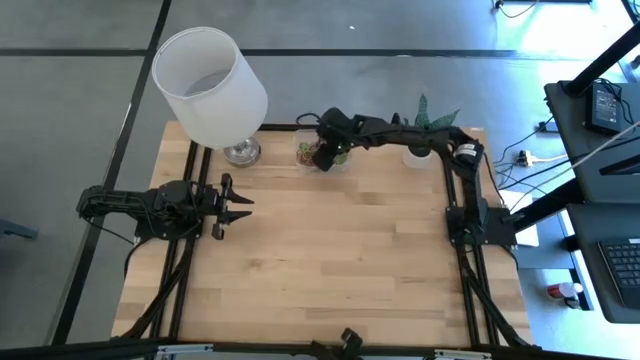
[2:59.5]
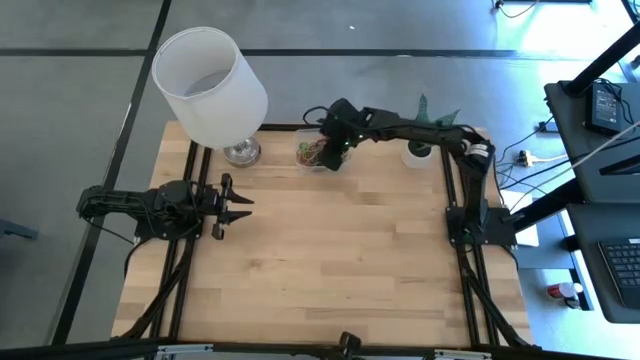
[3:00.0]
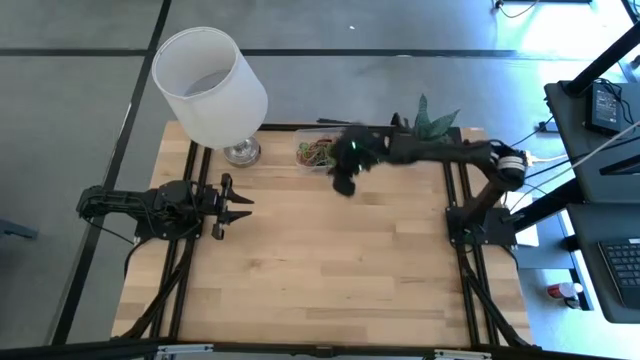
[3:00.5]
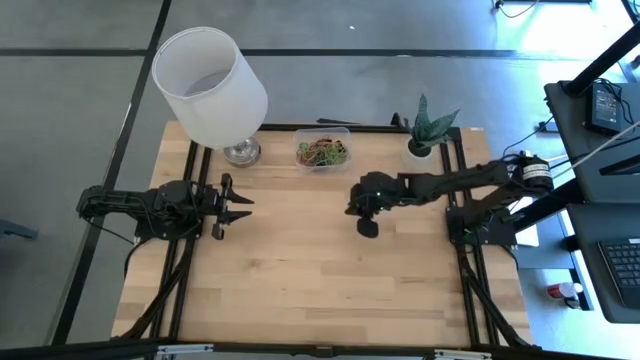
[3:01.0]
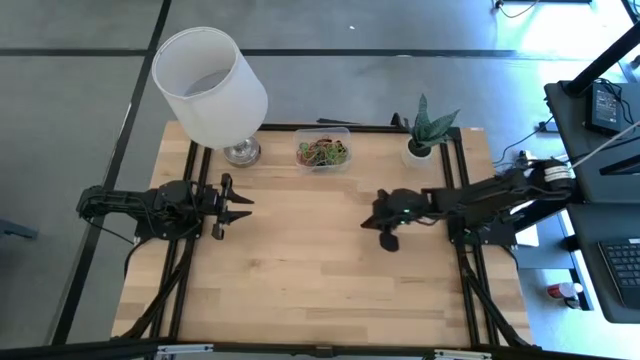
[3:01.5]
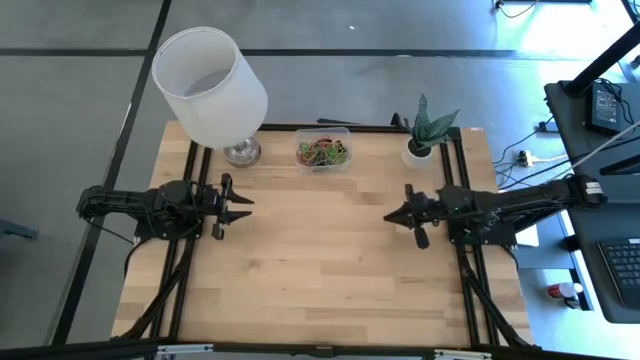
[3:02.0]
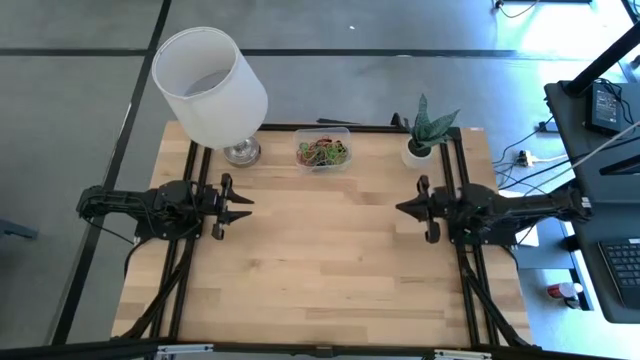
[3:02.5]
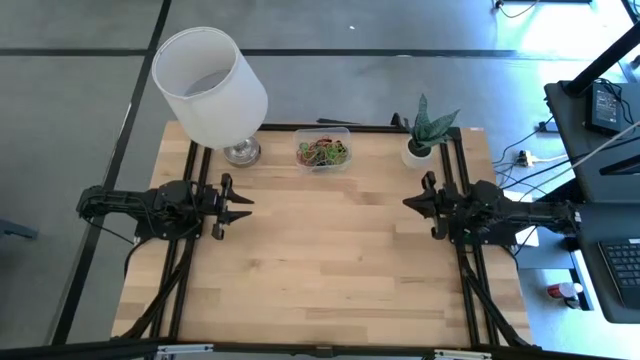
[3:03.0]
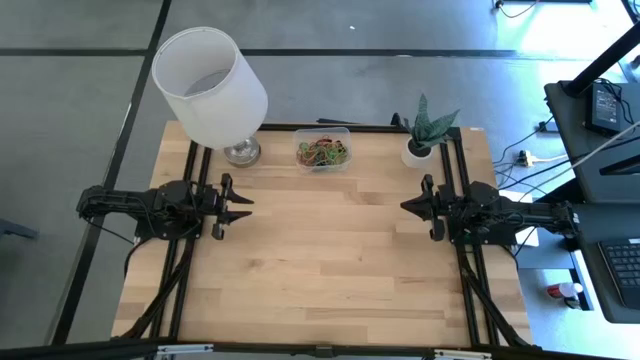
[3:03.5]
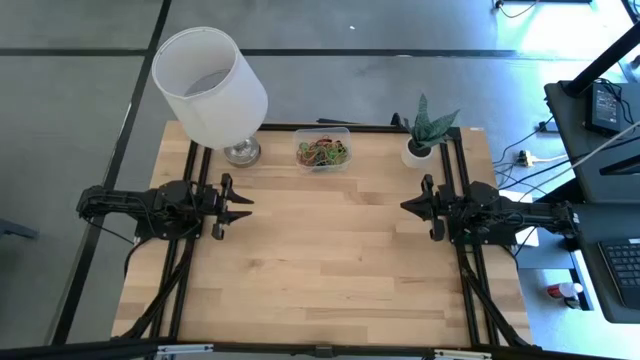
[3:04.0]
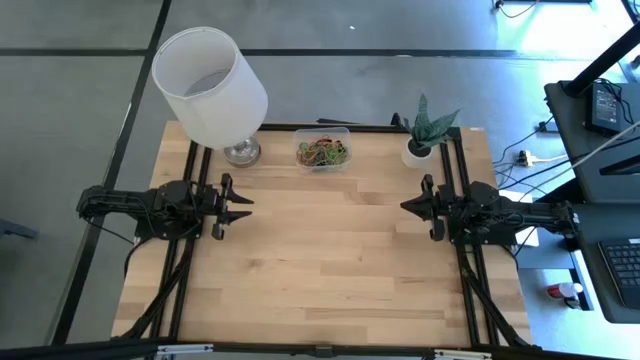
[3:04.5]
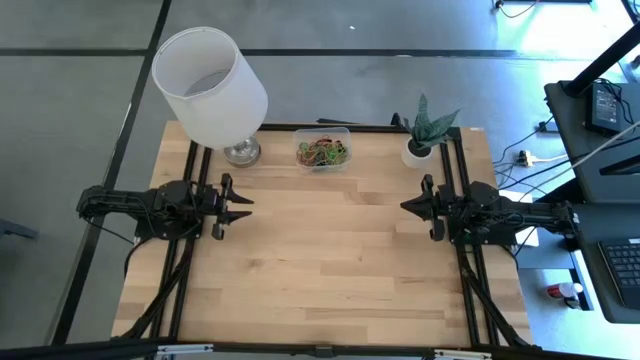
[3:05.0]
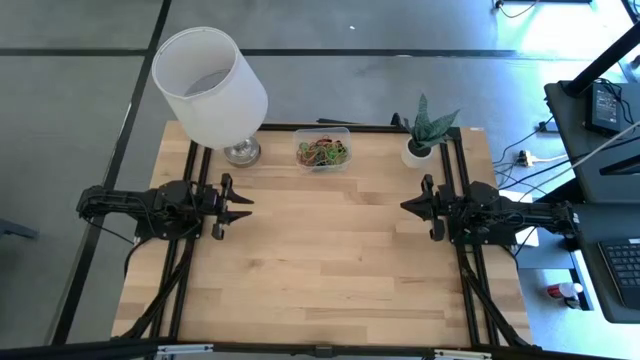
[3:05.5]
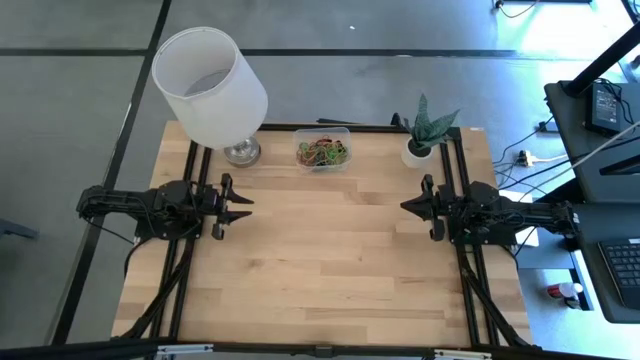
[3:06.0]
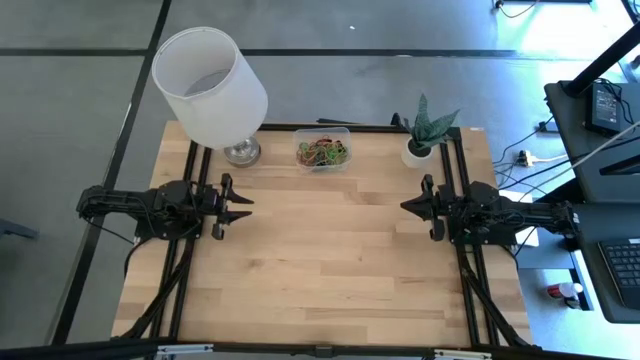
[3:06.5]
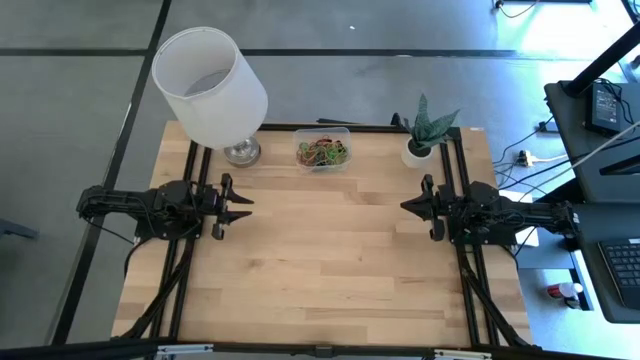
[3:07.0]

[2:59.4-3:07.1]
Task: Pick and place rubber bands into bin
Return to Home Position

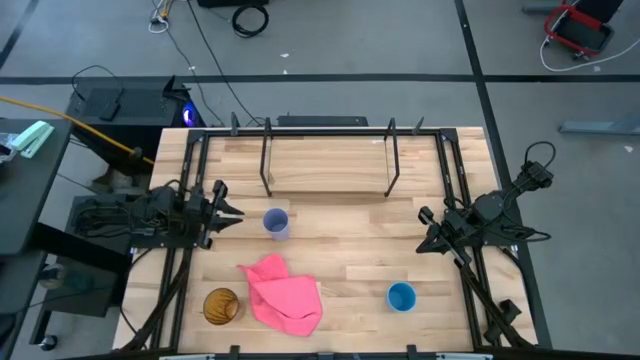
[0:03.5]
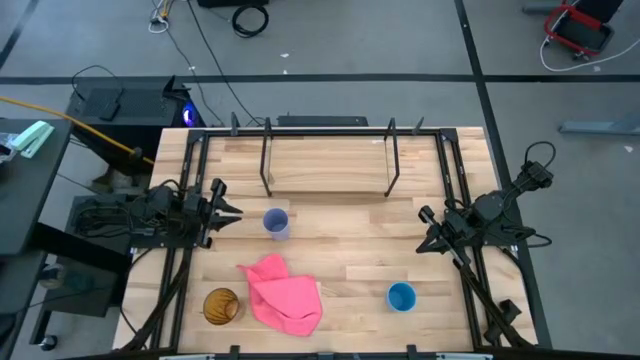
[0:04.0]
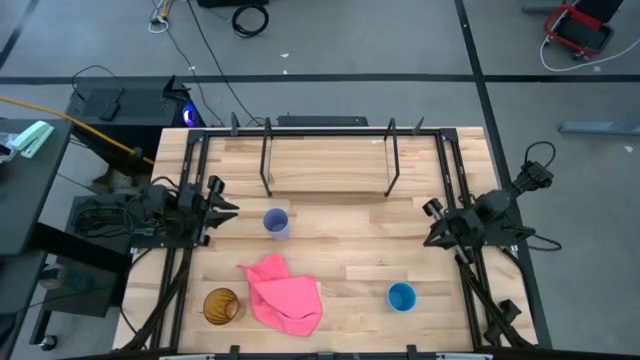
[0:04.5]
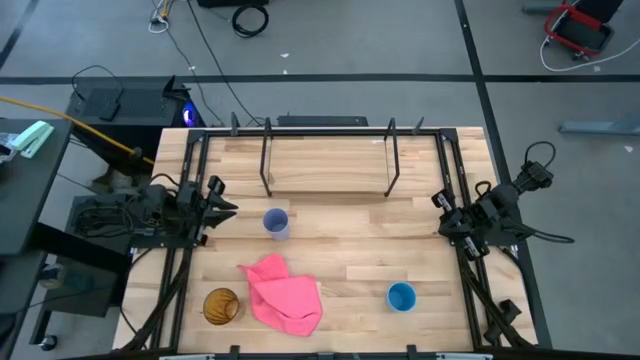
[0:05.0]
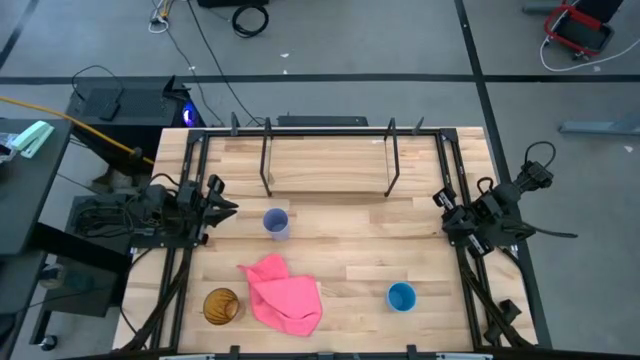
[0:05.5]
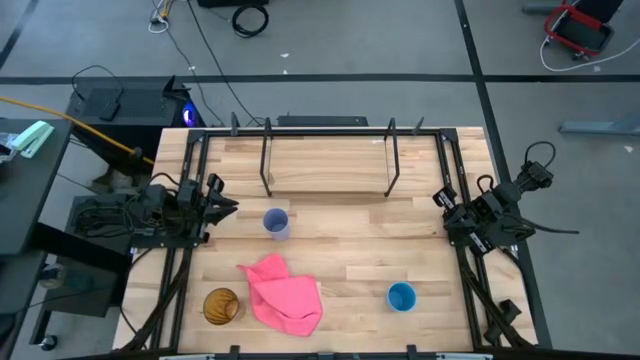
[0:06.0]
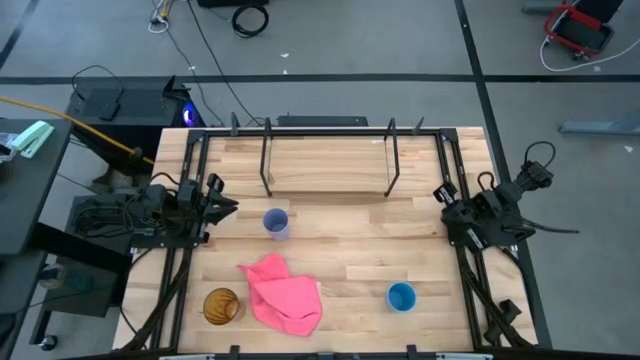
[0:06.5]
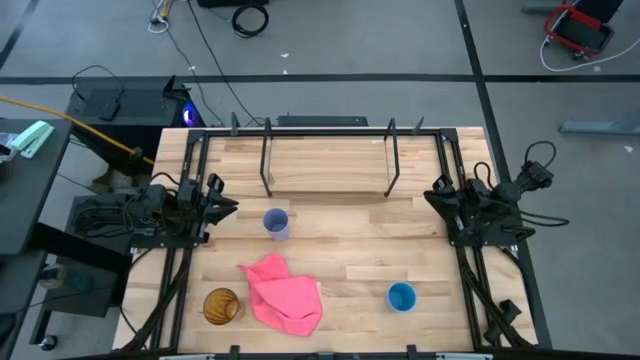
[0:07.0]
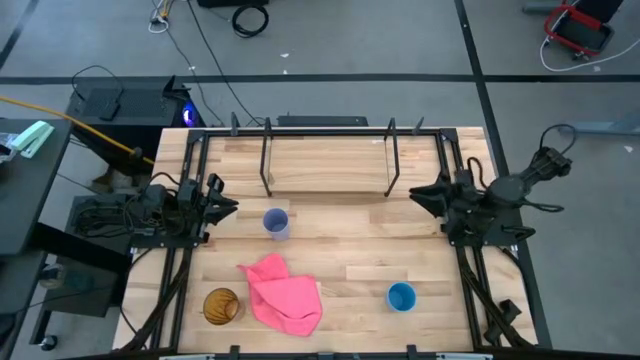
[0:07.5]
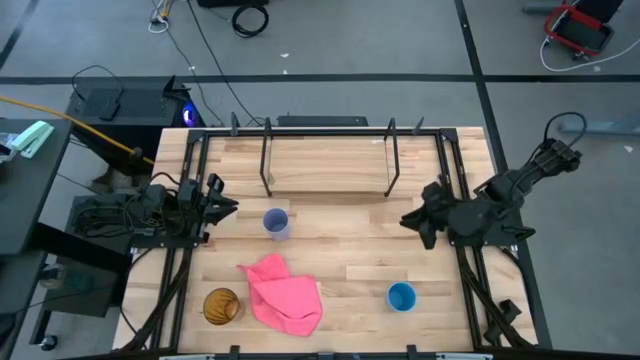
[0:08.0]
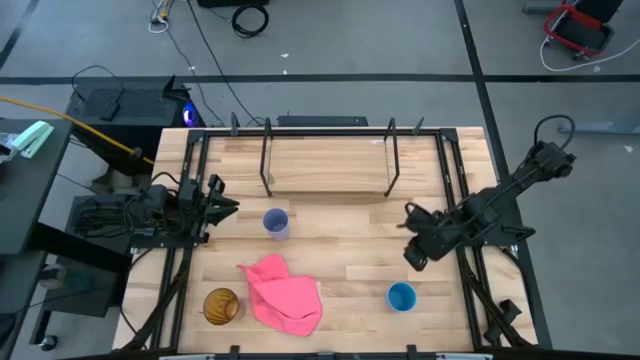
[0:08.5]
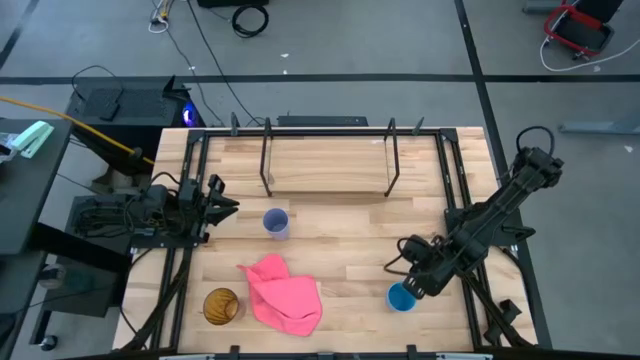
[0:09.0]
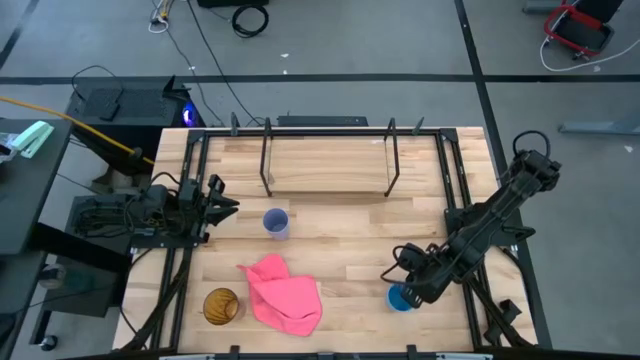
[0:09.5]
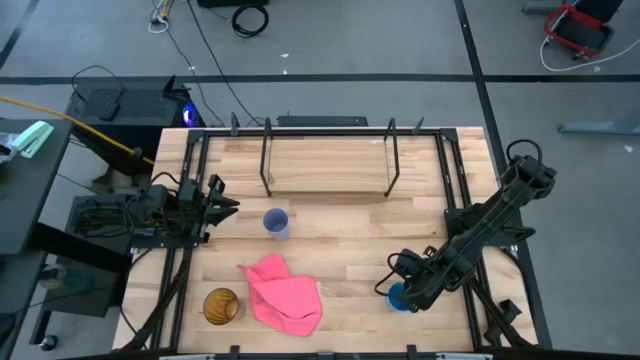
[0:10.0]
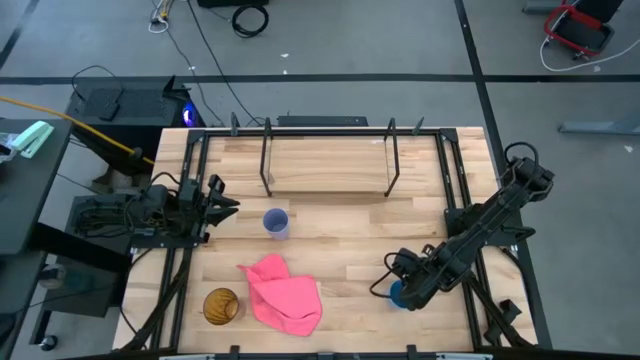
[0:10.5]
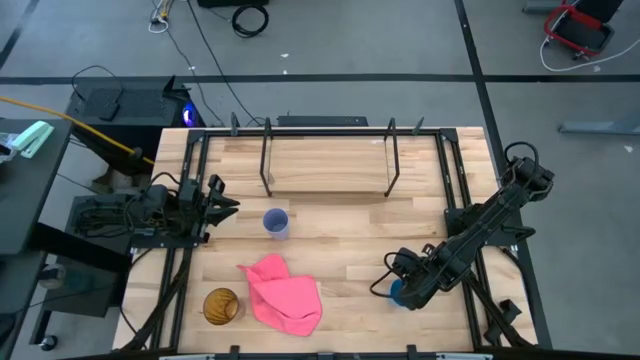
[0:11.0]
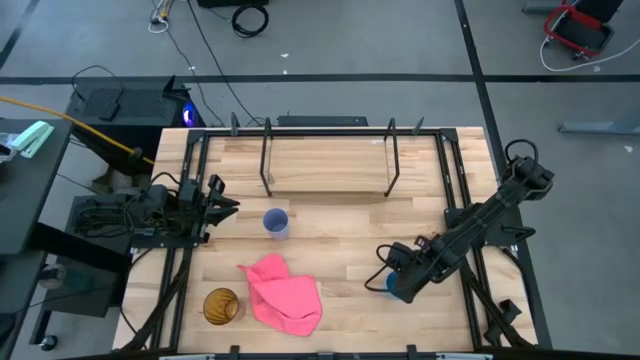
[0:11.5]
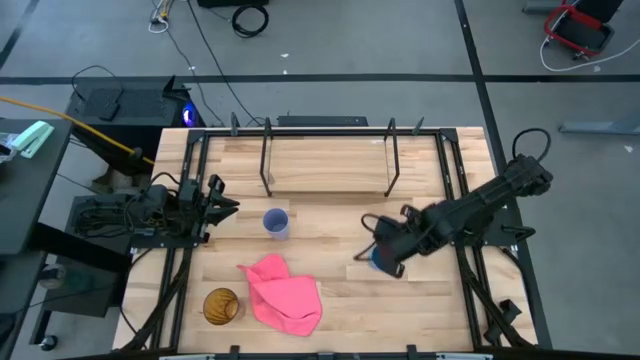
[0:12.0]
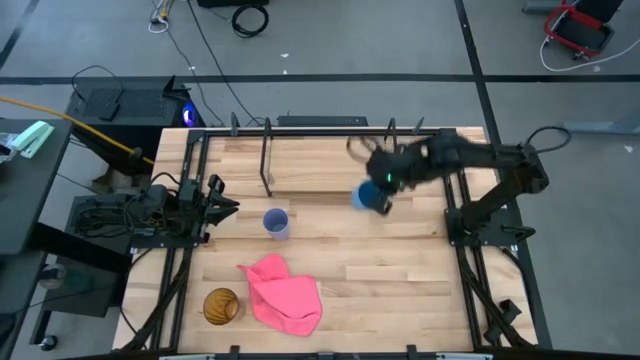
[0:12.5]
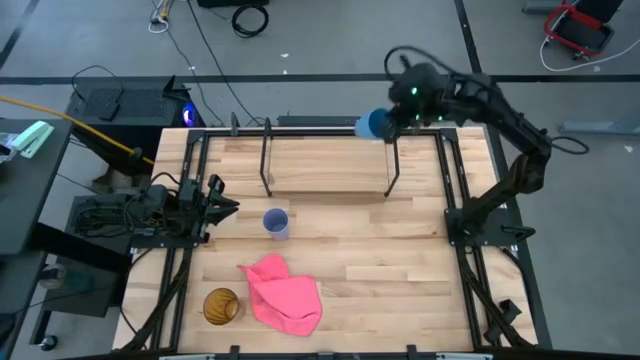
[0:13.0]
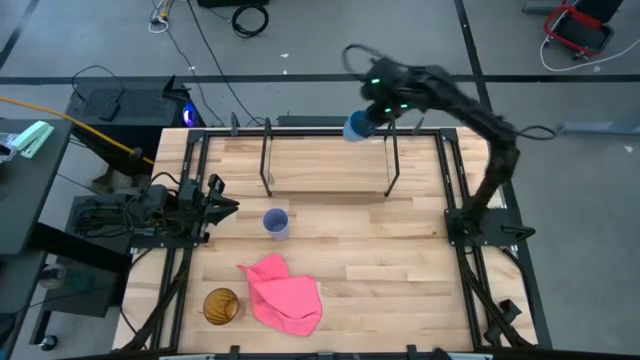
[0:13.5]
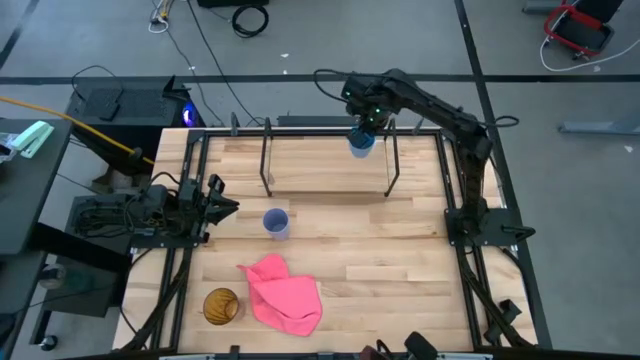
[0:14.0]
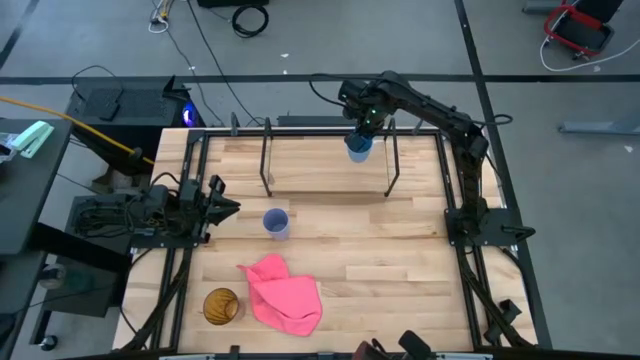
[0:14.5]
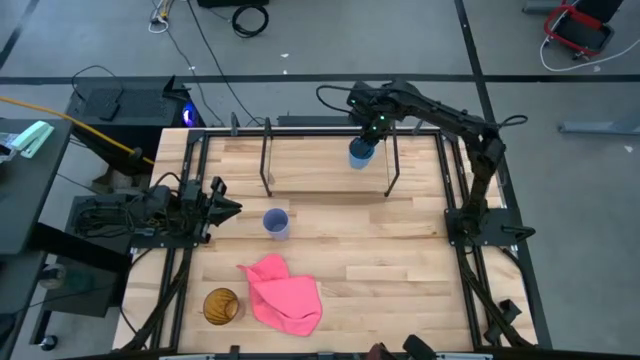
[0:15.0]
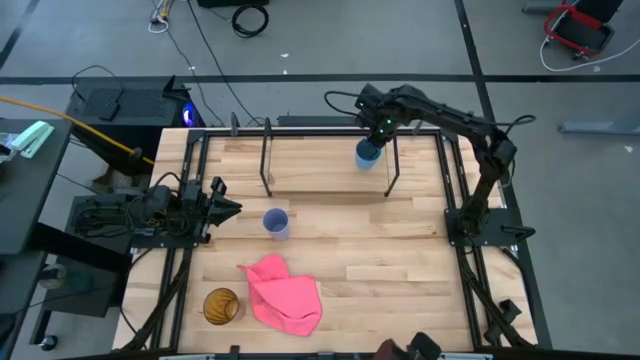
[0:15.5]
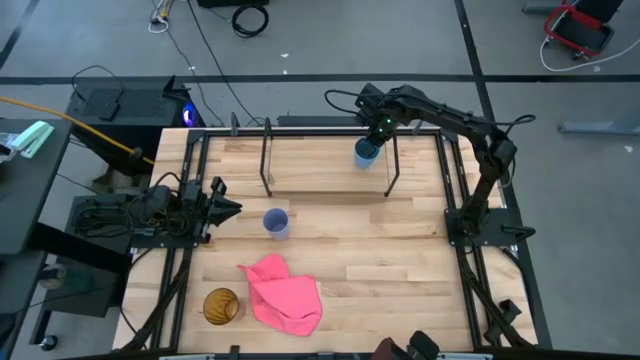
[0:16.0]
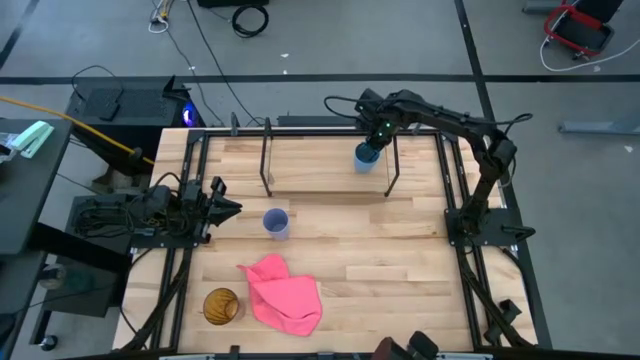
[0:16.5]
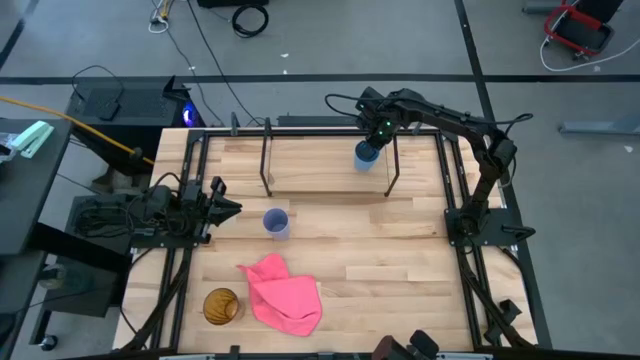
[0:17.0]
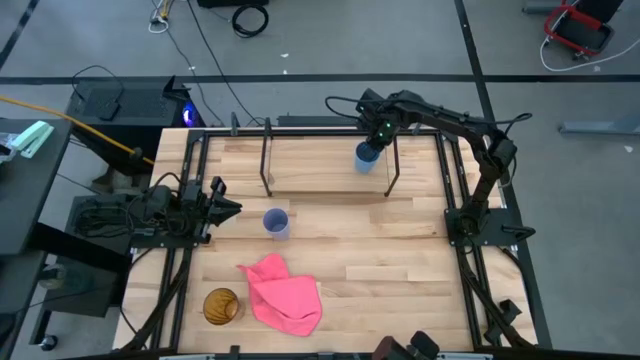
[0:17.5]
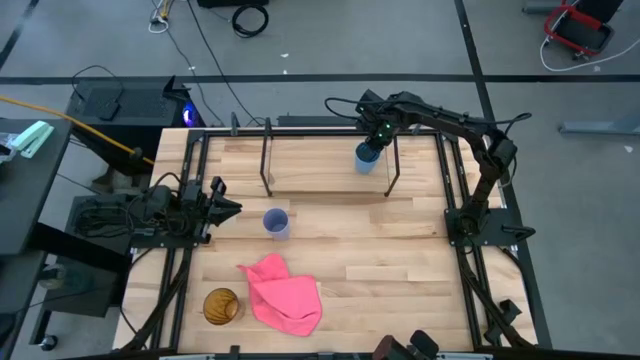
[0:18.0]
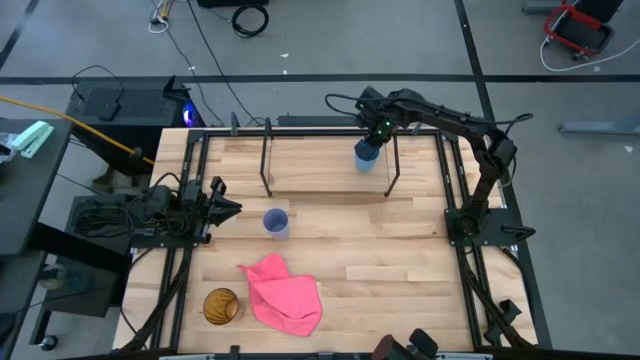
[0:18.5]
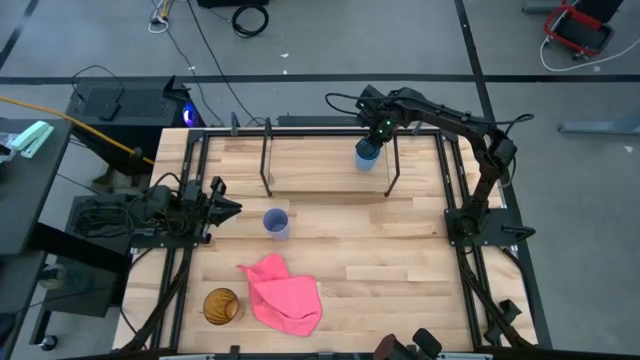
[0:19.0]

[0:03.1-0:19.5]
Task: Stack small to large cups/mugs on shelf
Put the blue cup on the shelf
